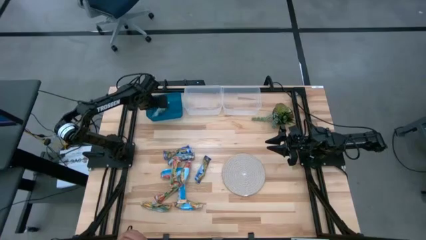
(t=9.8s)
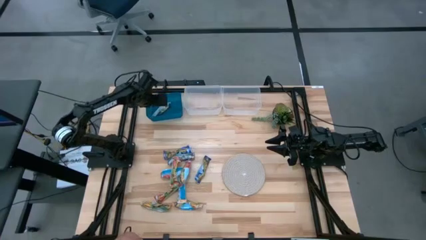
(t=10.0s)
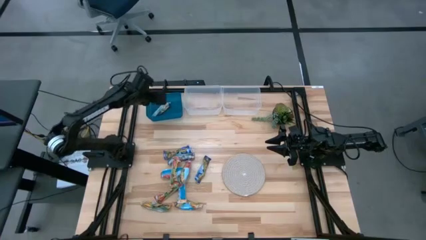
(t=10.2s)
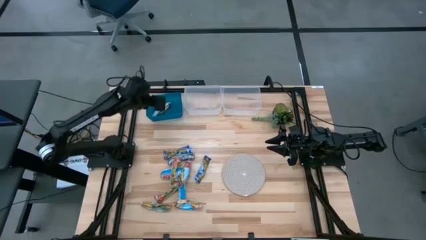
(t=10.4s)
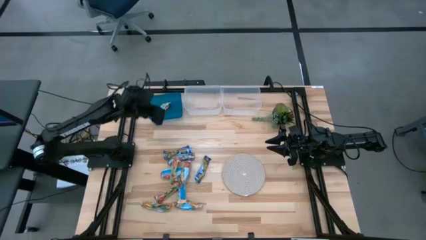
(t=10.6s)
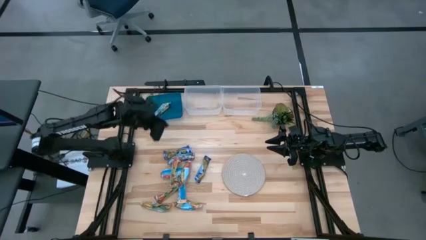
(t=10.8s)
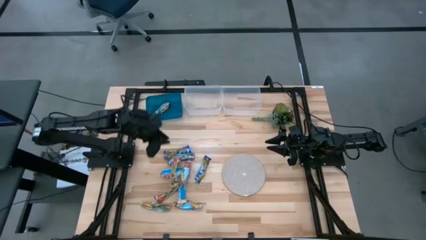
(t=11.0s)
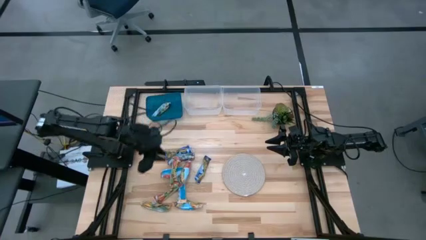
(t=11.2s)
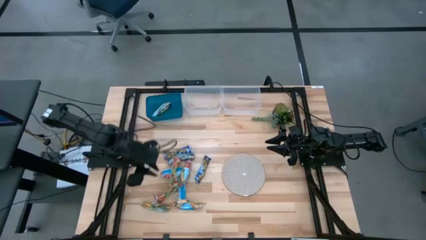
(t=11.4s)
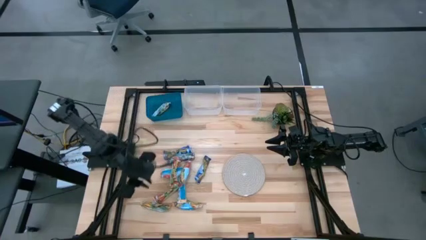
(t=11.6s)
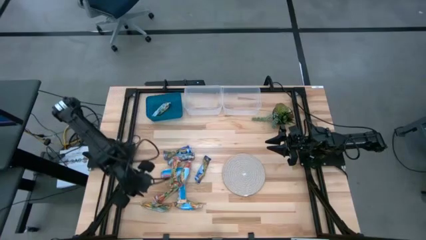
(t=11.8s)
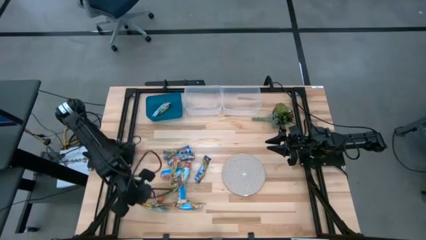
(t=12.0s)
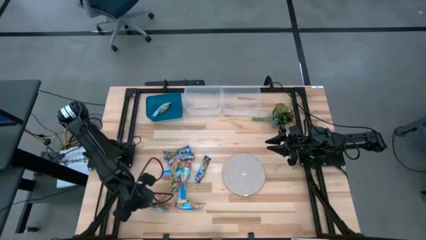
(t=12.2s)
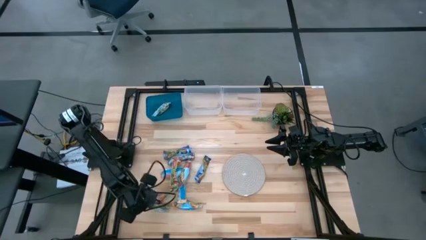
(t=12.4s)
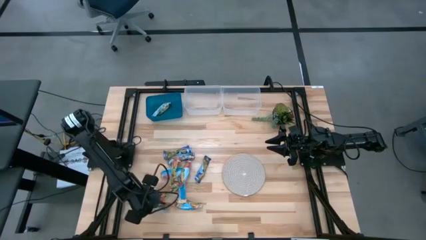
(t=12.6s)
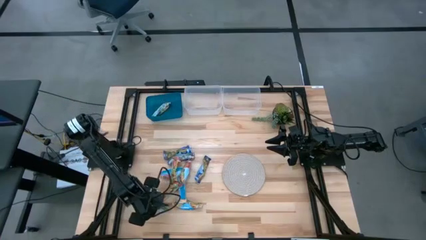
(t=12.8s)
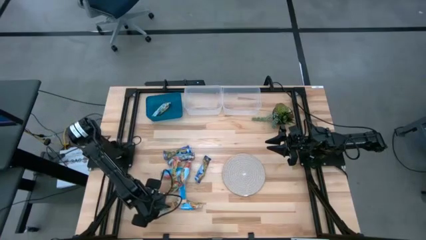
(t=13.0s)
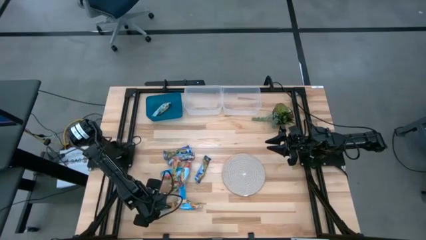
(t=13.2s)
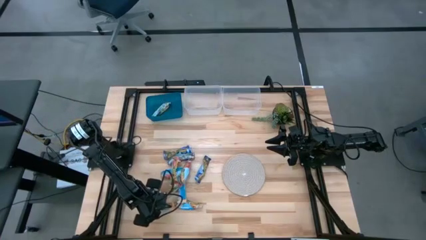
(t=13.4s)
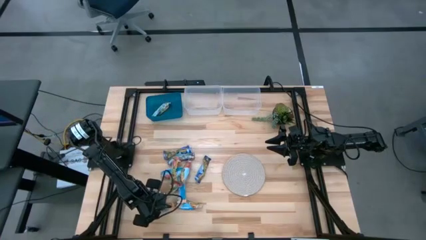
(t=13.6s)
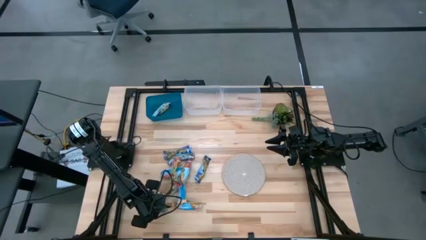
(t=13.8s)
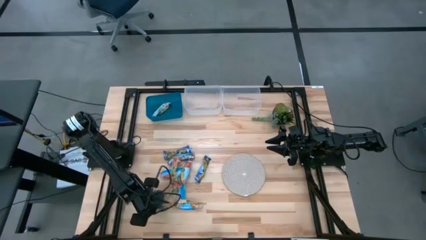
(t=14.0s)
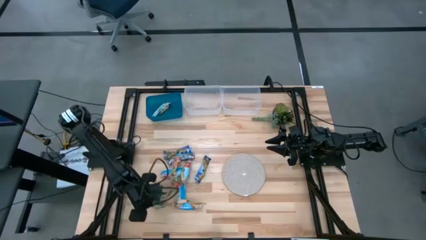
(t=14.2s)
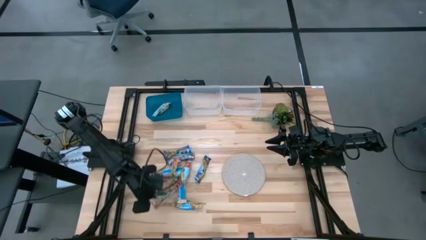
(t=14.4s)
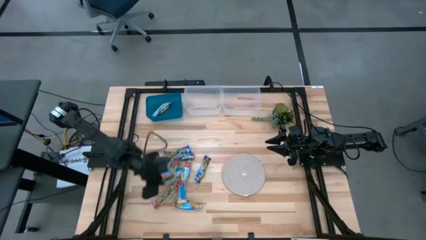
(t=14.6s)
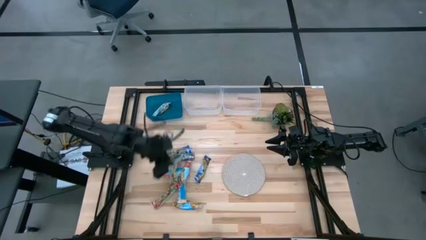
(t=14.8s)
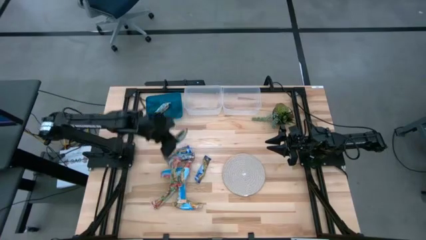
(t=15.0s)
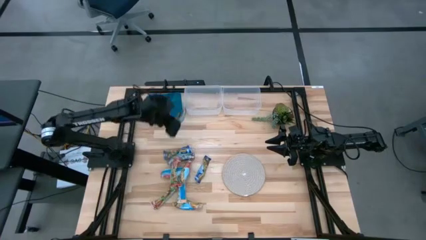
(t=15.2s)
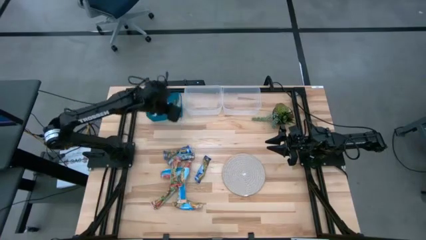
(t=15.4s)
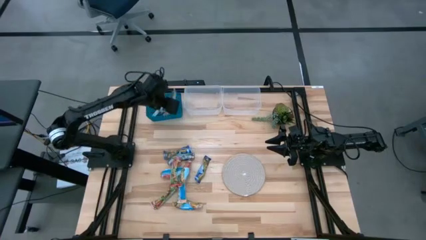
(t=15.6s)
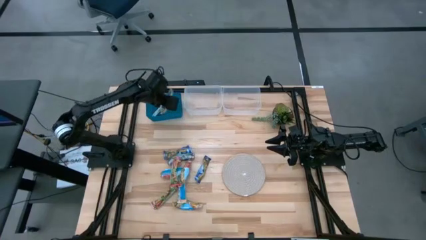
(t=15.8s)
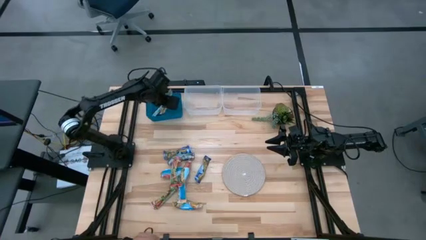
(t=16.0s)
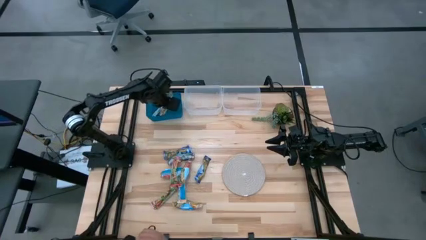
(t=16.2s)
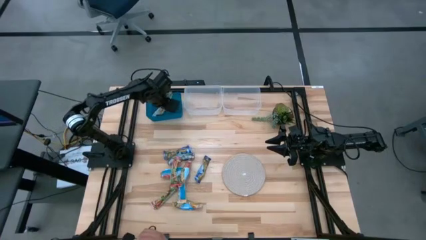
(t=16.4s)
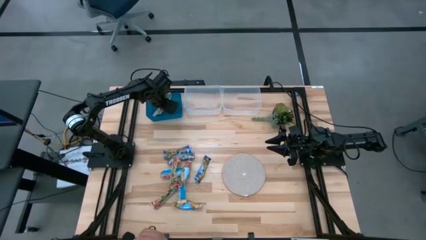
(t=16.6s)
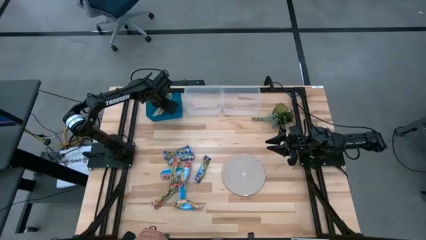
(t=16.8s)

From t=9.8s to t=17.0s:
Task: Pick and place Granola Bars by type
Put the yellow granola bar into the blue bin

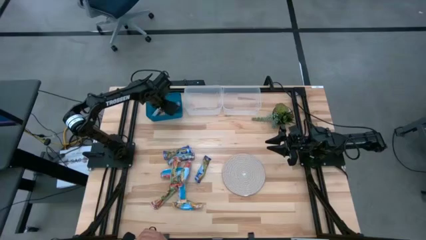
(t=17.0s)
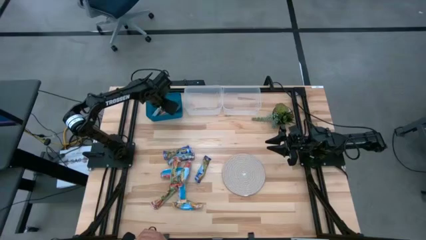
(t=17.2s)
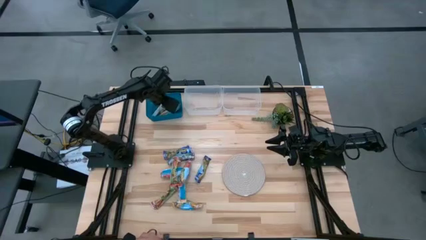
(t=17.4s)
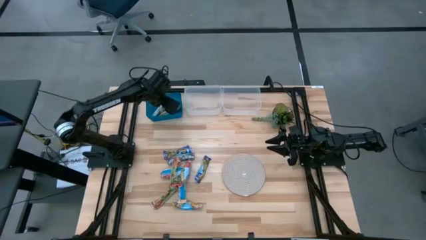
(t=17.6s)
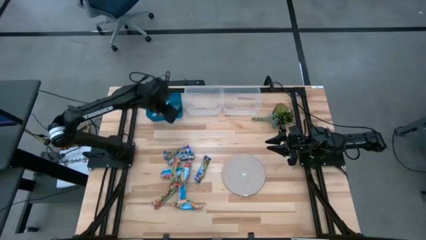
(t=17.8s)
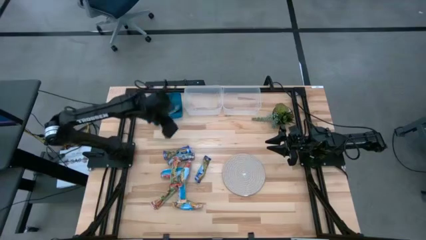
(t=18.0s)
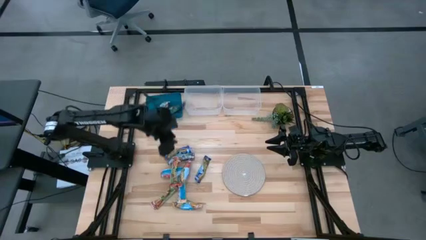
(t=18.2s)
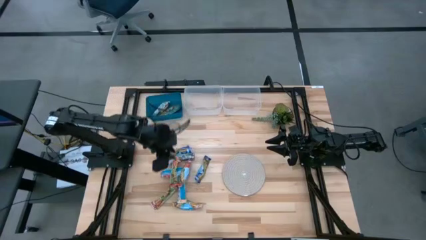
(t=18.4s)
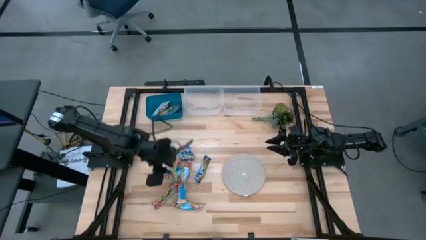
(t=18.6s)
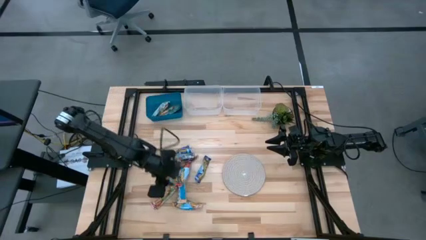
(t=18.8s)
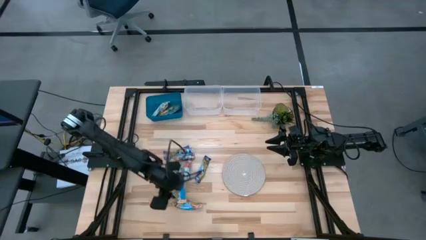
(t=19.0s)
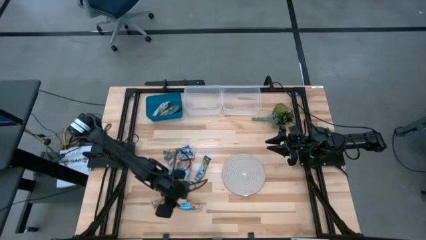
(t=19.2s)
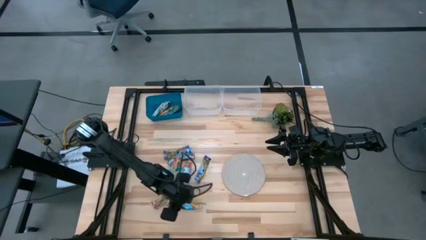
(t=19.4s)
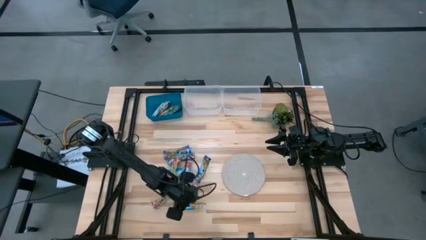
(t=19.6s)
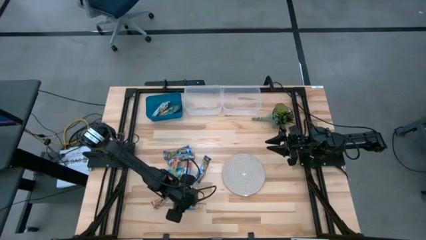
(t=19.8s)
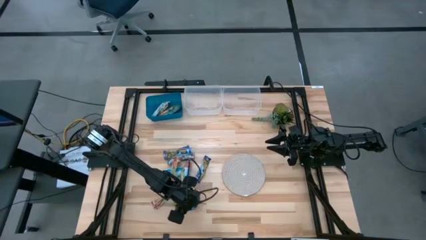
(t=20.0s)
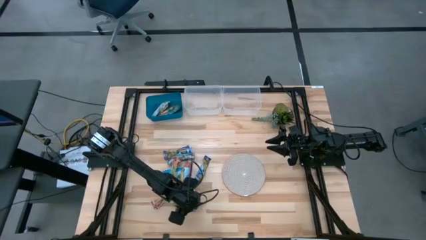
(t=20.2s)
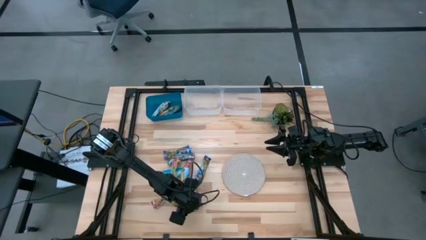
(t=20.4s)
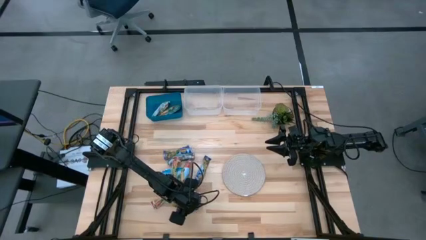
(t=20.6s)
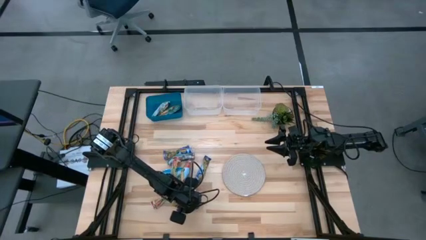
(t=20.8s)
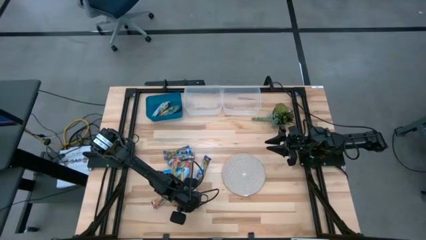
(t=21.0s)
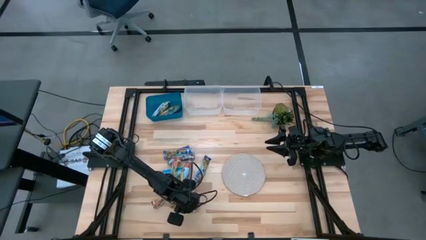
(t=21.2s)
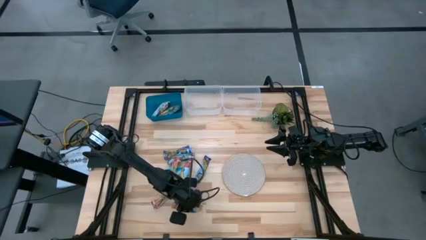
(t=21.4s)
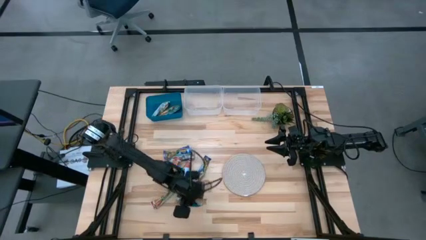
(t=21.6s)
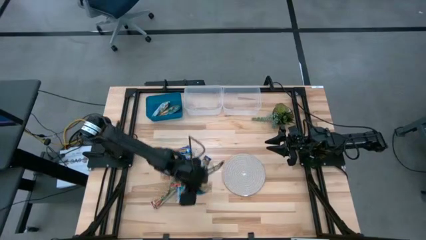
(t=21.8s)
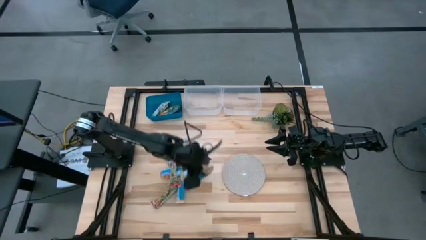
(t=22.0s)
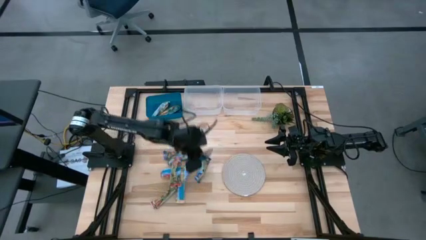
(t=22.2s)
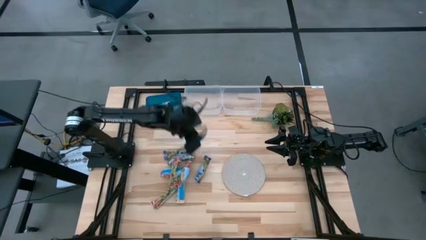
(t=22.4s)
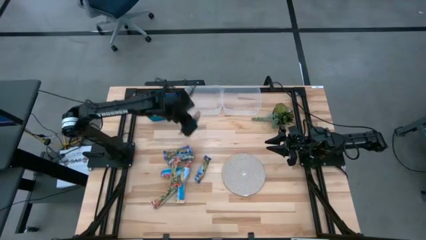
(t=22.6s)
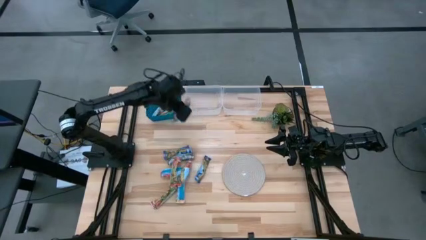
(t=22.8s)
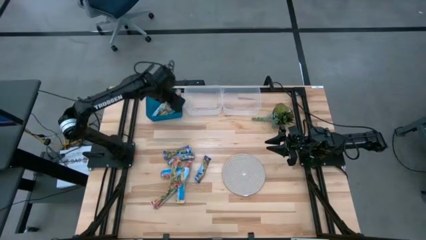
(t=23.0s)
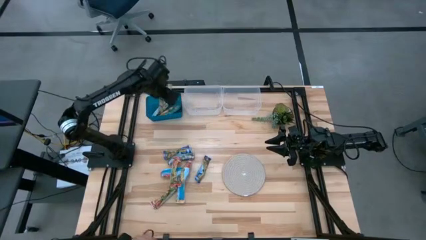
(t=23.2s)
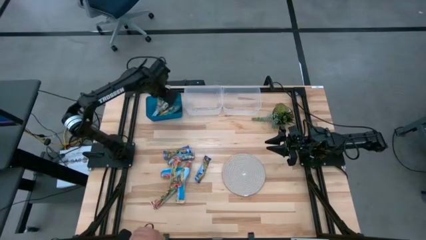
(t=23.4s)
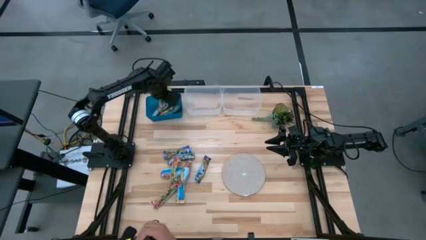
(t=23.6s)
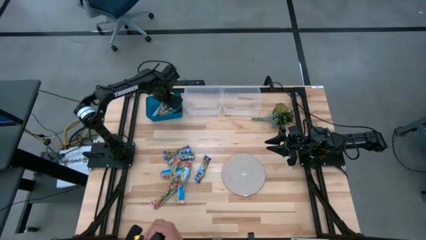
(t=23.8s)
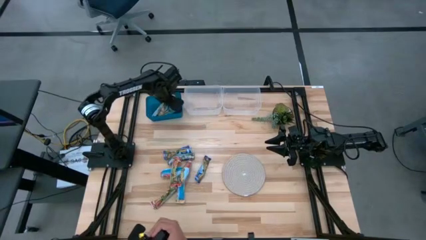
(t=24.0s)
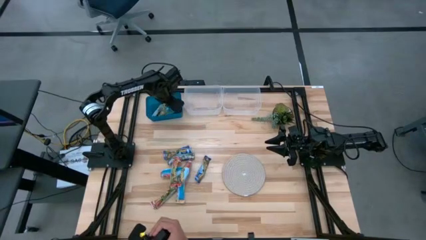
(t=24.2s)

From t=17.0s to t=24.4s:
Put the yellow granola bar into the blue bin

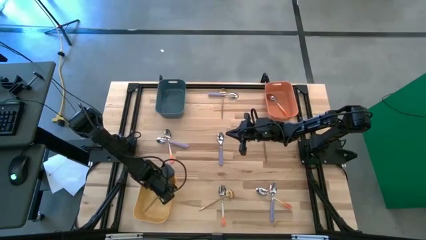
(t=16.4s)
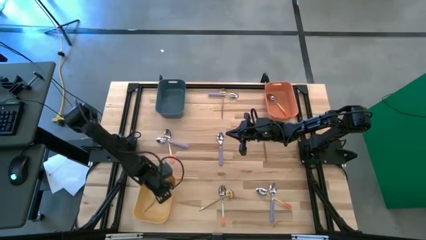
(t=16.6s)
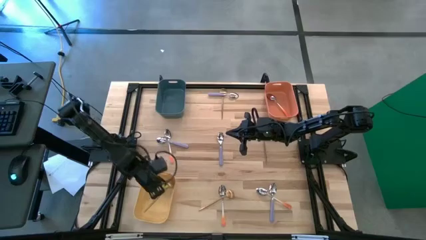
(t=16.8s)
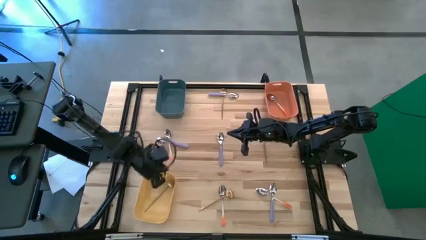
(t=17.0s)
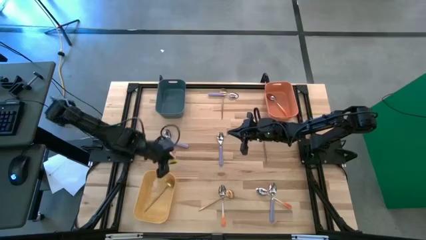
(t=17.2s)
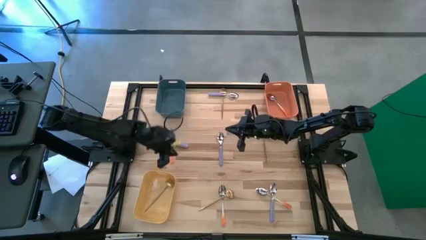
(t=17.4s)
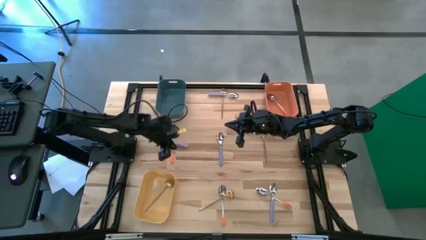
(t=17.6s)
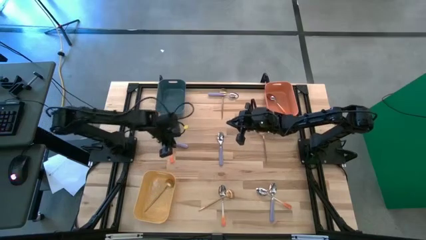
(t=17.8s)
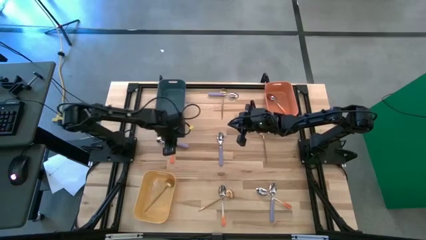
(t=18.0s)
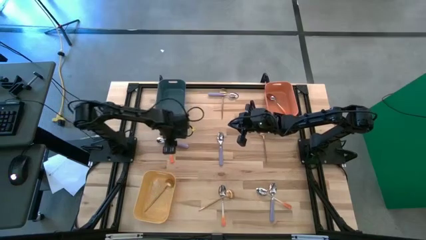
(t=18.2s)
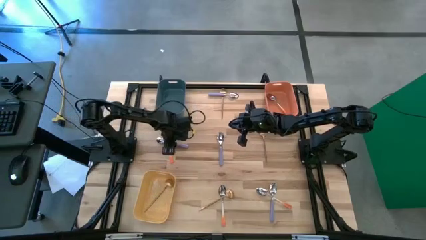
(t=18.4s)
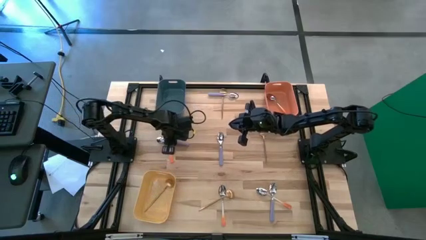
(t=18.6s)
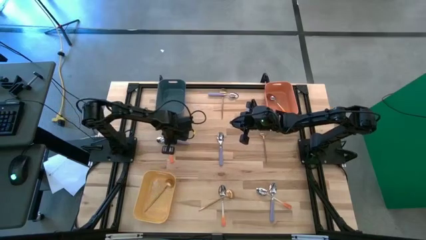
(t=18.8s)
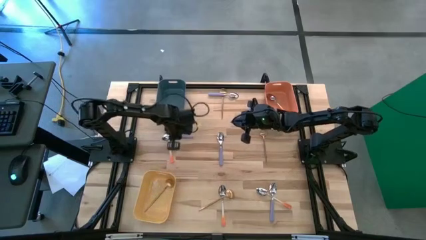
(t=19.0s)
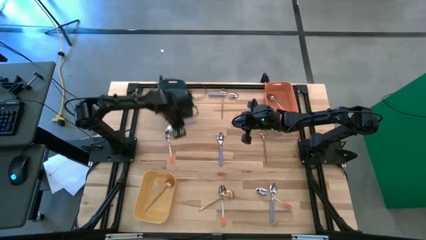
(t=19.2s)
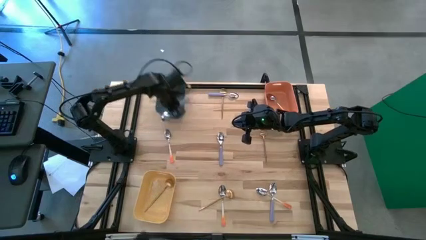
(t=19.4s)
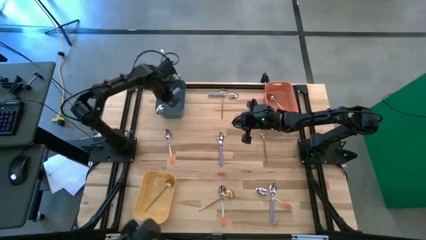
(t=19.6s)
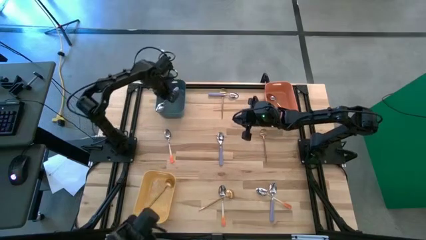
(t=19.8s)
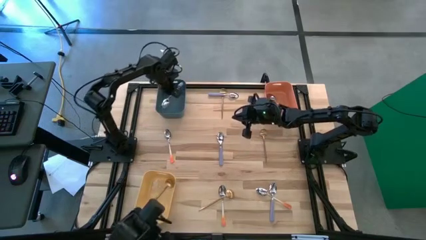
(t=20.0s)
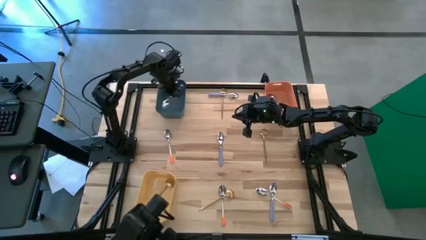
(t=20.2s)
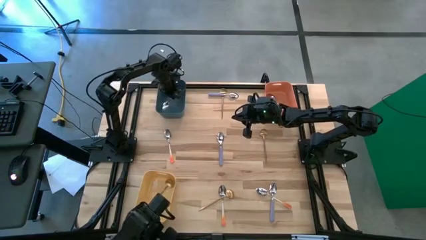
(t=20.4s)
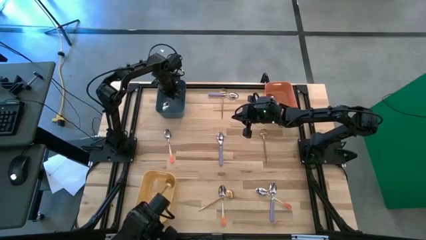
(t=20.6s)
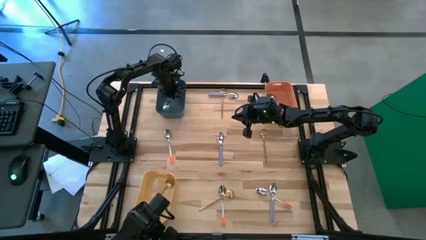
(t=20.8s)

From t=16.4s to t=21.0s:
Task: Sort silverware by color (type)
Put the middle left purple spoon into the blue bin
